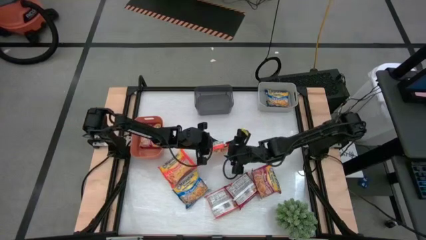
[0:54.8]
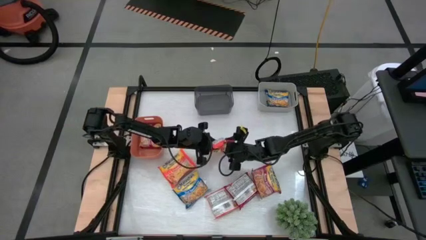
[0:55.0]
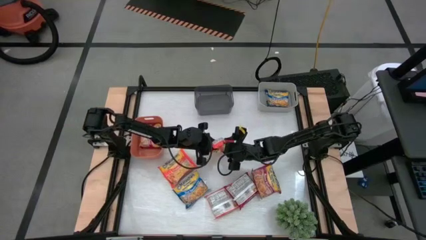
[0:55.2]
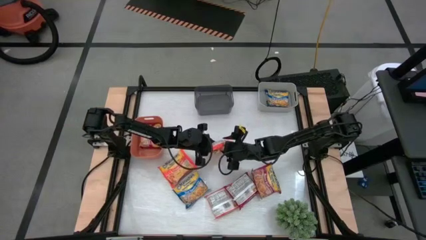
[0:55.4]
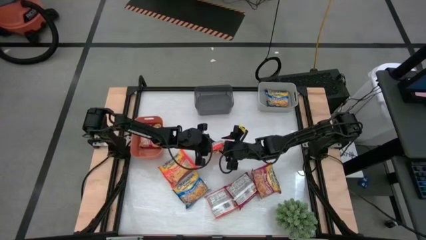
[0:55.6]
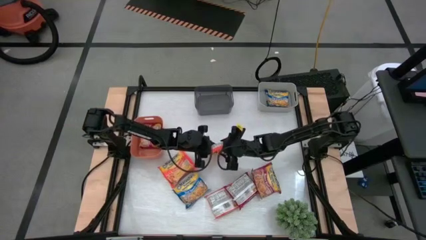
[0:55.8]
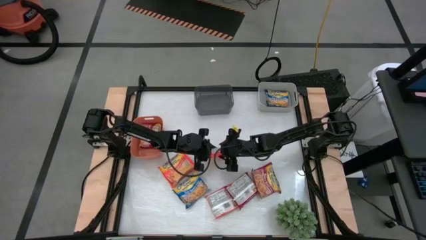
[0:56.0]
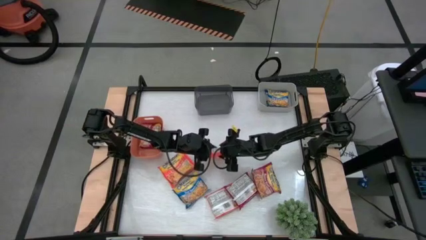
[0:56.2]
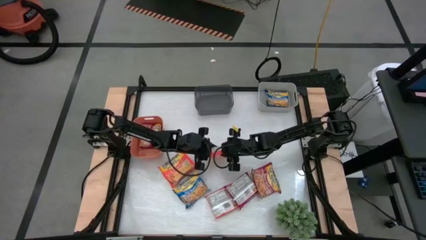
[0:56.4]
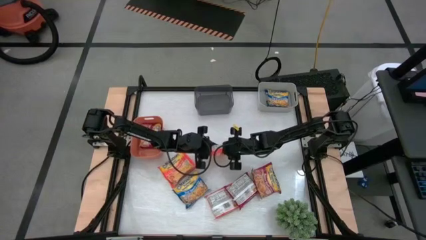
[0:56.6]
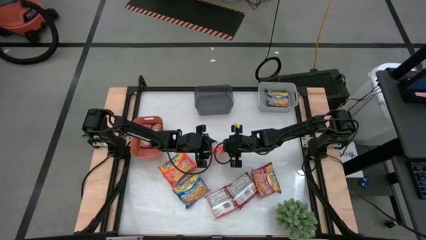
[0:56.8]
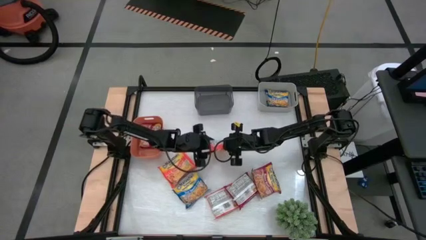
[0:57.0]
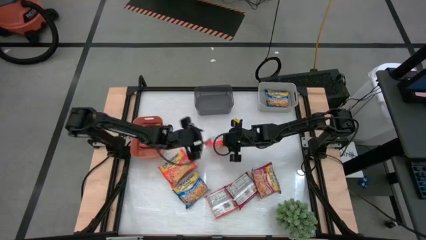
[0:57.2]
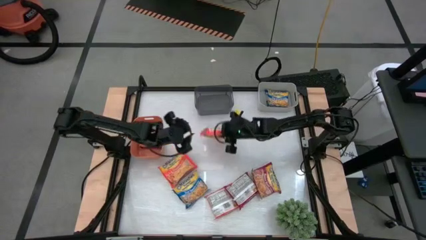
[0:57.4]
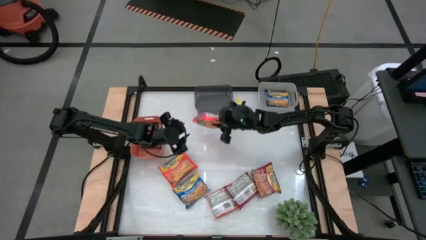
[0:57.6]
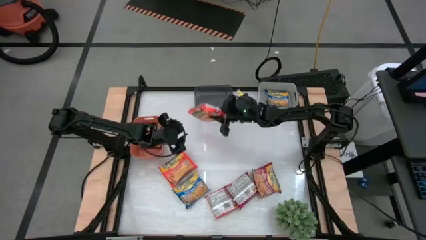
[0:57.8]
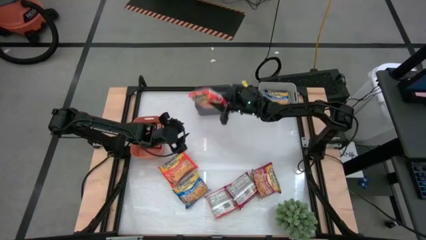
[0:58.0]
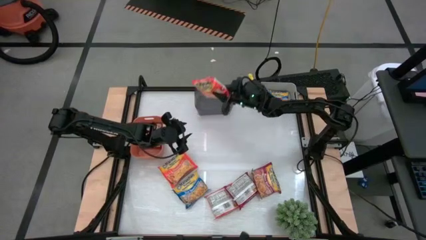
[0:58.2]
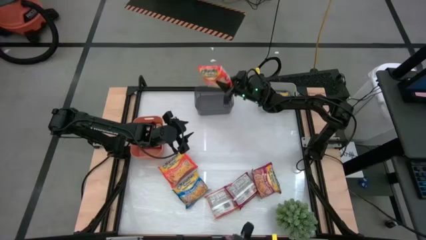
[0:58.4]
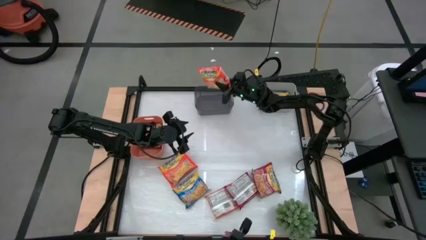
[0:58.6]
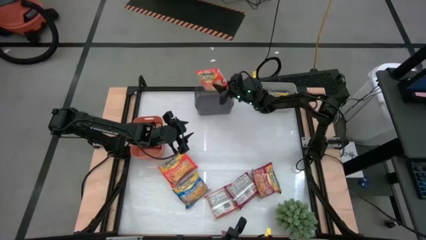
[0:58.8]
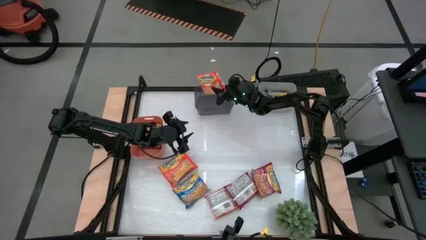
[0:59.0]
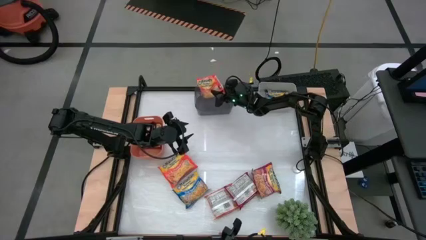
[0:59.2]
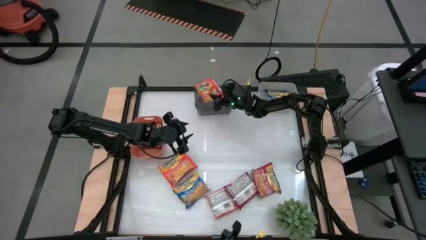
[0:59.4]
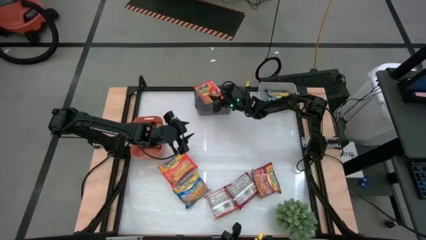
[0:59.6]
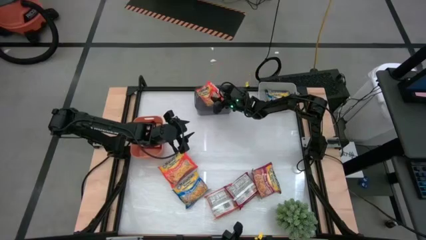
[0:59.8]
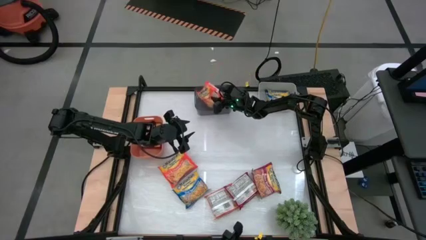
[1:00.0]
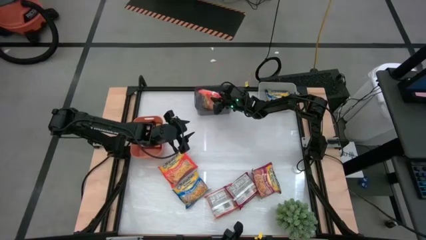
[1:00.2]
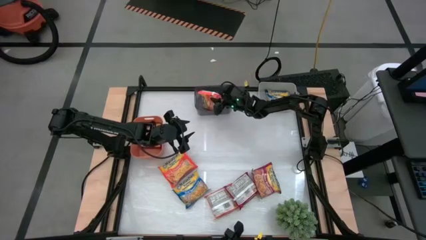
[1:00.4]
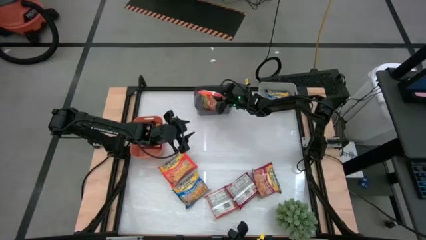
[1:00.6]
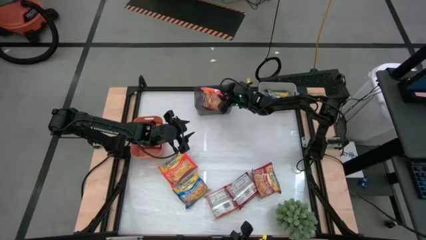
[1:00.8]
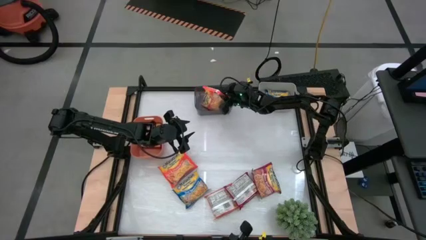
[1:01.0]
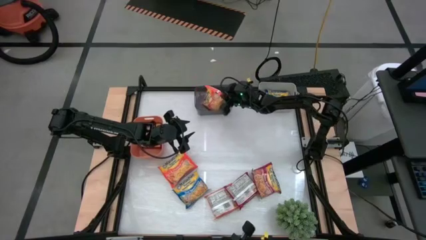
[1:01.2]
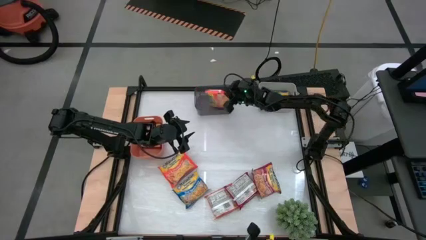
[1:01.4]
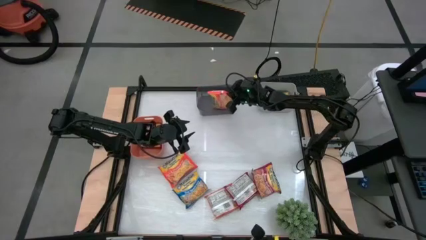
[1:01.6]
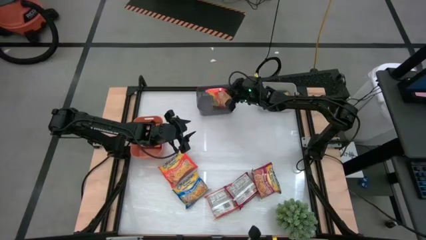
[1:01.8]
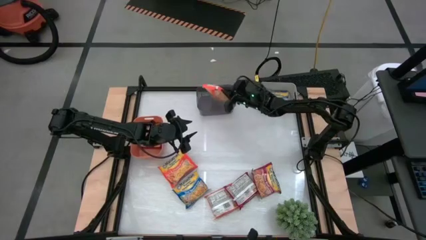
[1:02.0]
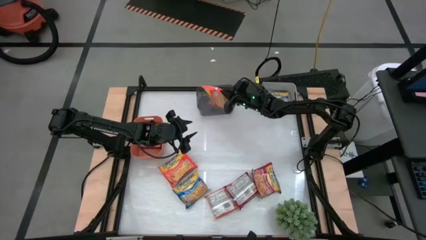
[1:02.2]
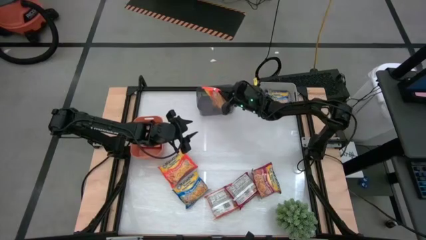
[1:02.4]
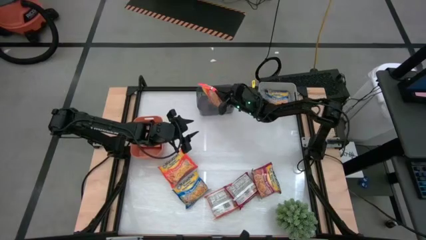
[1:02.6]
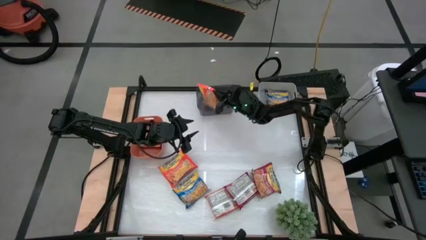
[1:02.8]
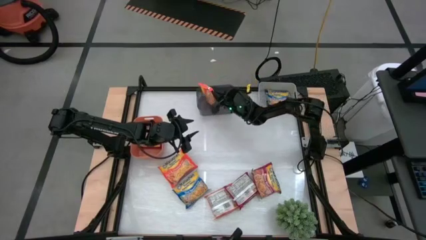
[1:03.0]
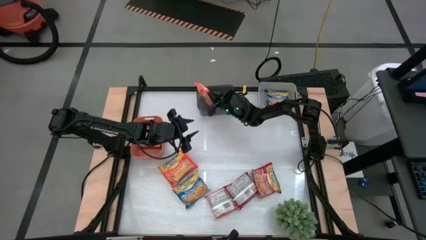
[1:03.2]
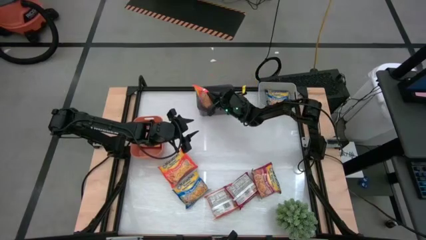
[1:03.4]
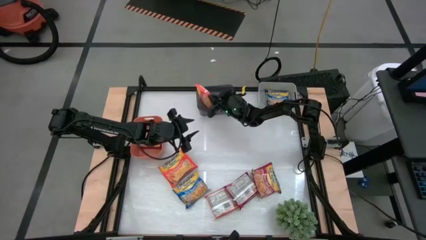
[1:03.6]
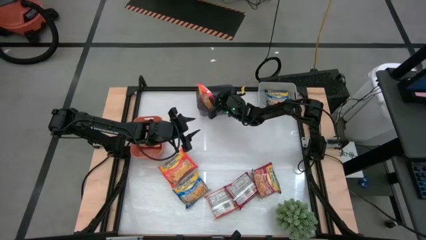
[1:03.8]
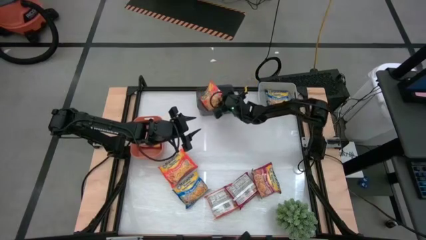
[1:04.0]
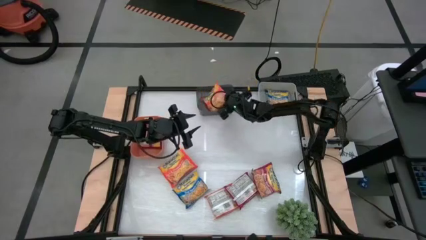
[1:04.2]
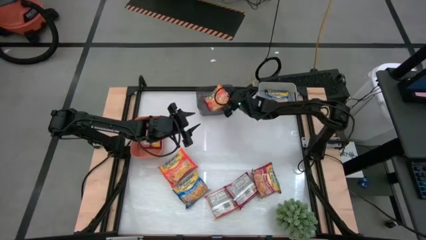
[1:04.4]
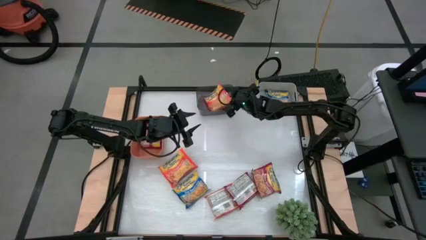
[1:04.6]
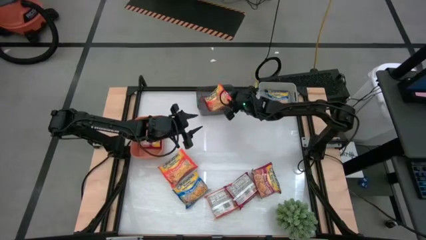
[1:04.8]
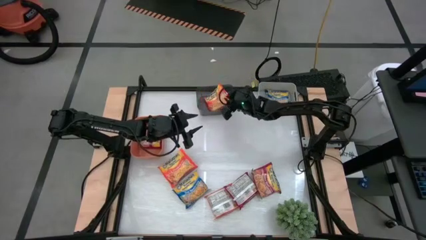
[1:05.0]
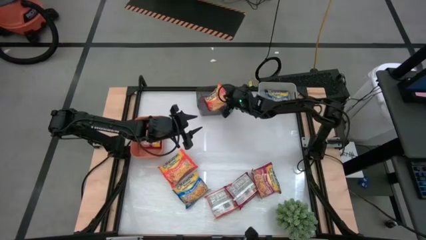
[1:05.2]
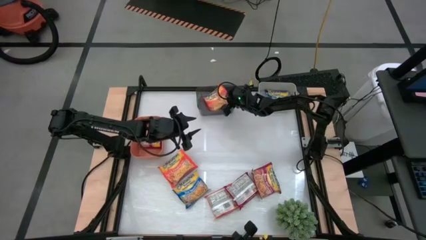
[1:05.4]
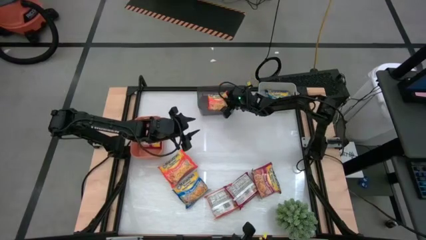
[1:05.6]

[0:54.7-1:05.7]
Task: Sort Maruchan noodles
Put the top right orange noodle pack into the black bin

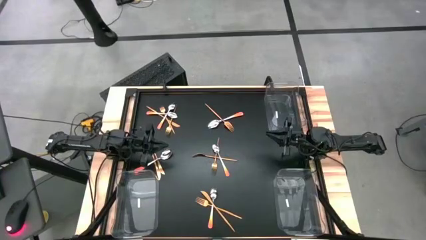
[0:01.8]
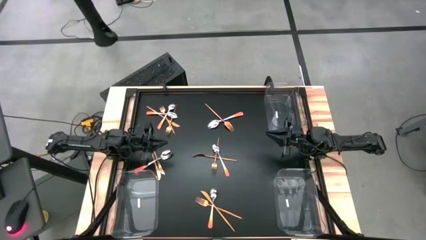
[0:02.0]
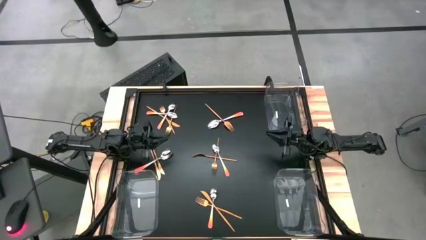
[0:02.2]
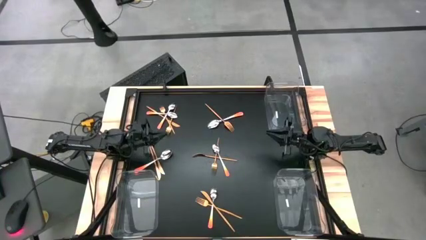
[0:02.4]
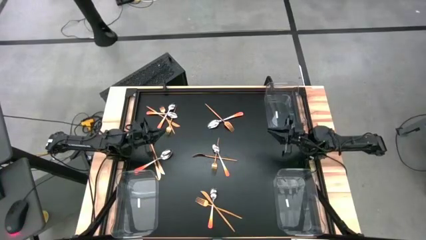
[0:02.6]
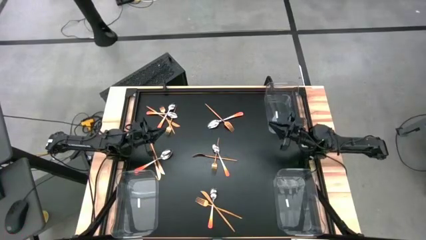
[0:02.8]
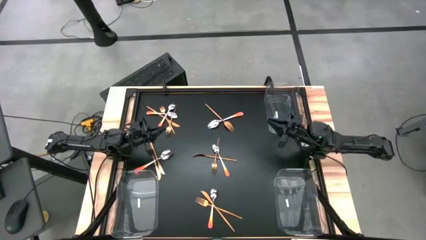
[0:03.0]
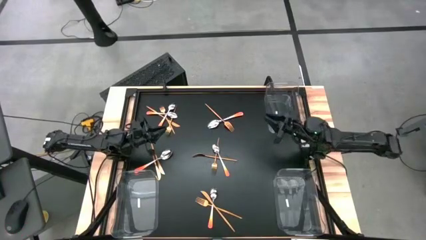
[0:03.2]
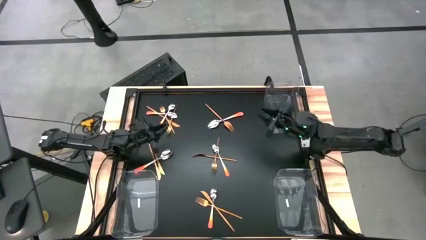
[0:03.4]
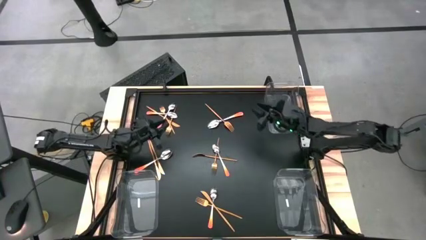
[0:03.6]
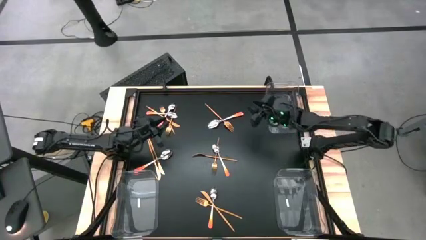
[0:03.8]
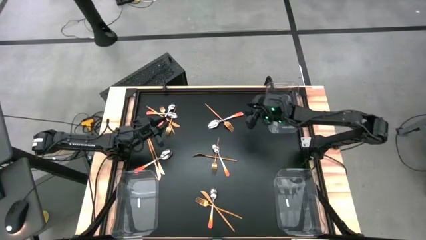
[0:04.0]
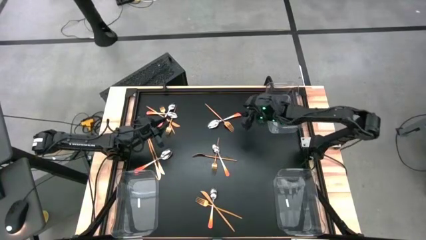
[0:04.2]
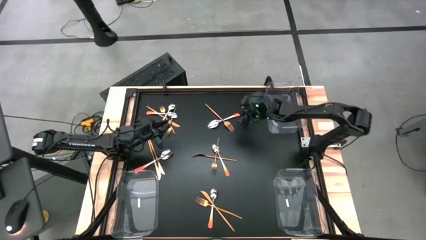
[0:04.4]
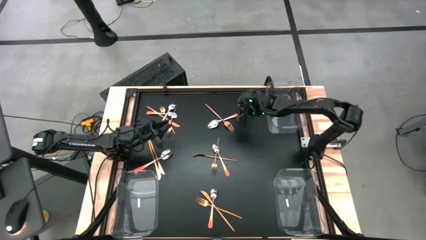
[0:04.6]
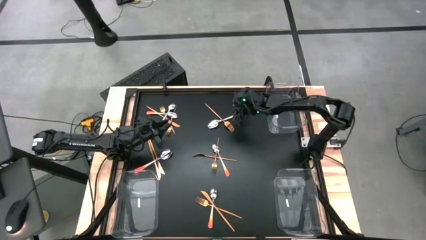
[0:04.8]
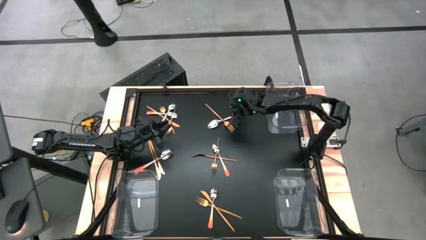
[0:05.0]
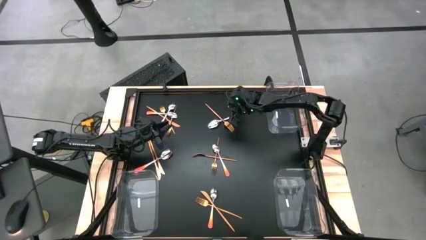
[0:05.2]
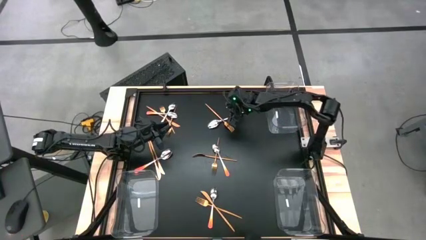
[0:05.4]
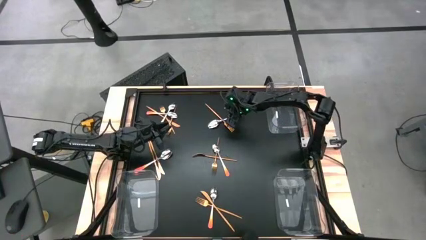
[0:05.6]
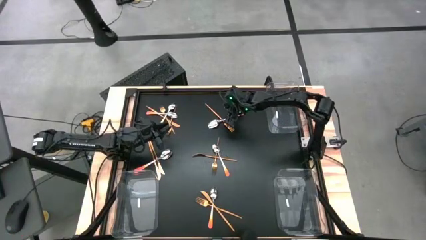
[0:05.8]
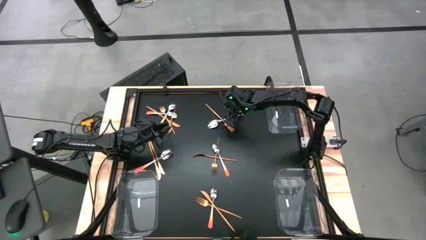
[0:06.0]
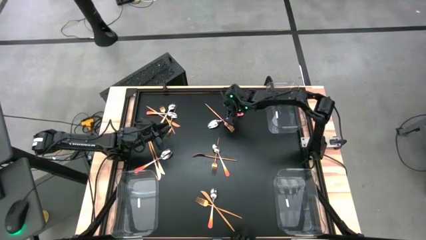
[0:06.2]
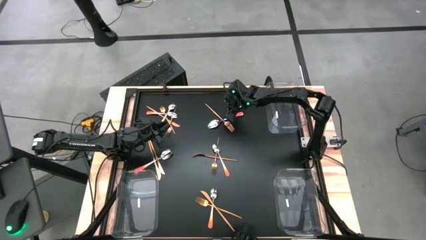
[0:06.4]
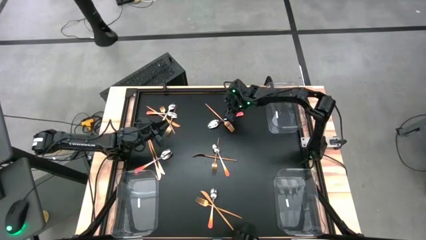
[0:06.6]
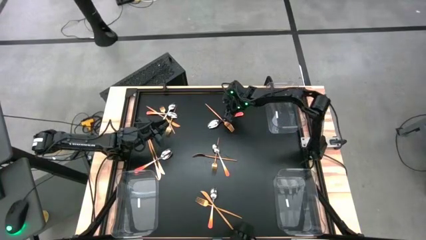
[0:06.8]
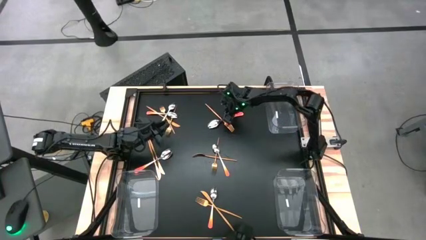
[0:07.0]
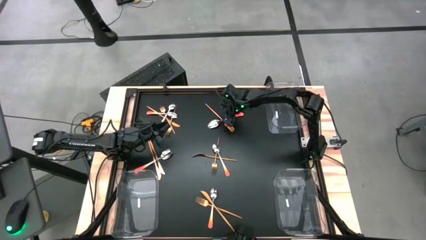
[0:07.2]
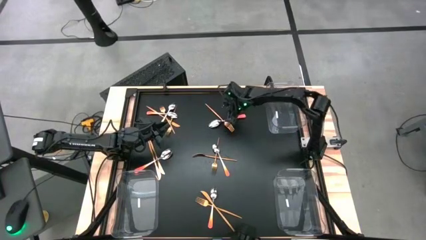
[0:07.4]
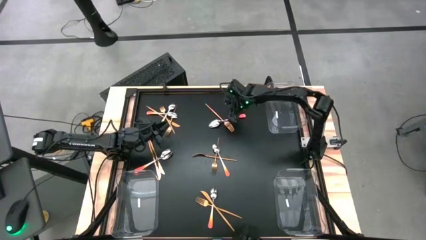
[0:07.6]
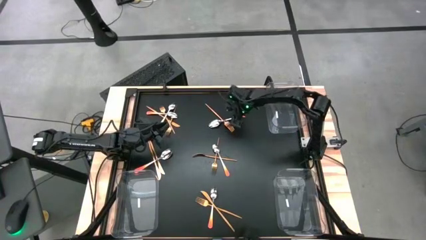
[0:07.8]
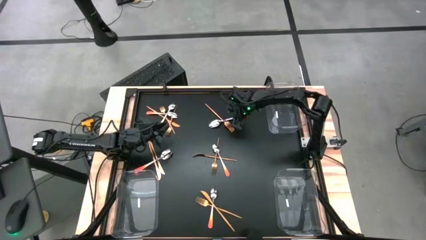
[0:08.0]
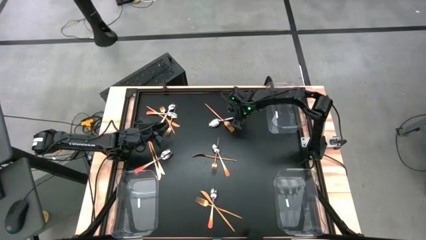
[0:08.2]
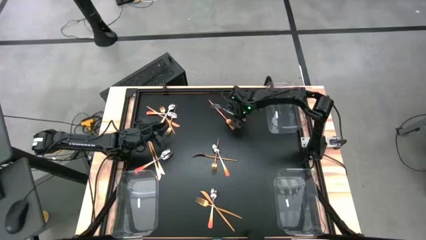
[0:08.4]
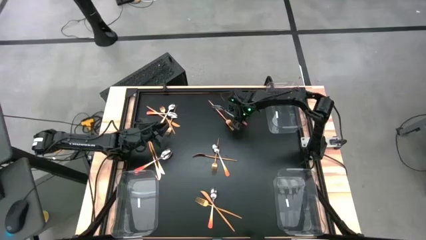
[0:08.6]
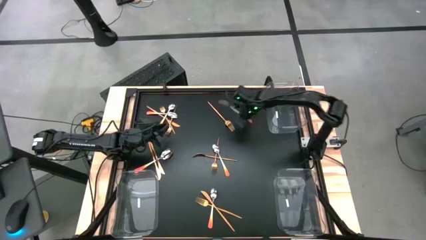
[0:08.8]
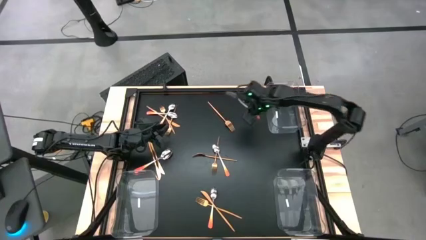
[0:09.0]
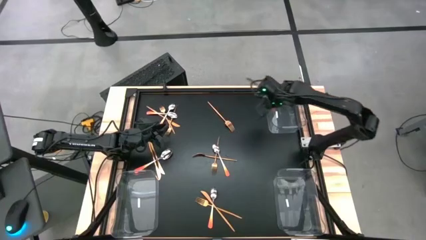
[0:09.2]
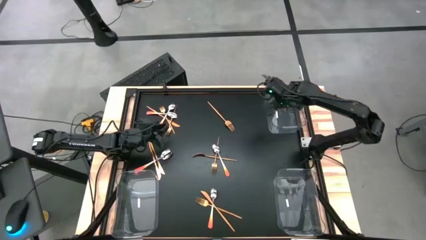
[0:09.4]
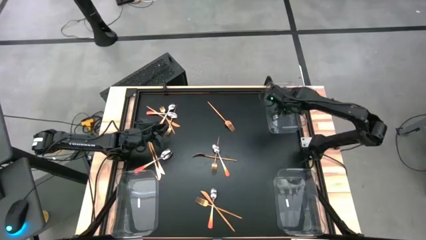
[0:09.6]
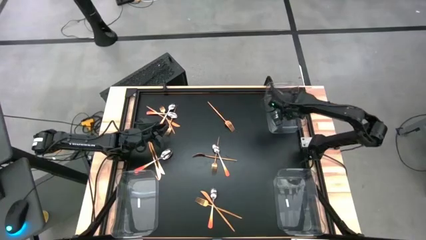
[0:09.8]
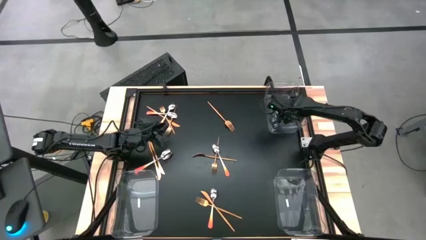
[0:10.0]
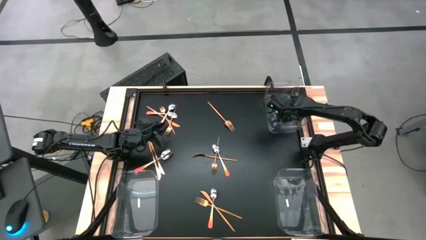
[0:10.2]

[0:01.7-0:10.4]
Task: Sort silverware by color (type)
Put the orange spoon into the top right transparent bin
